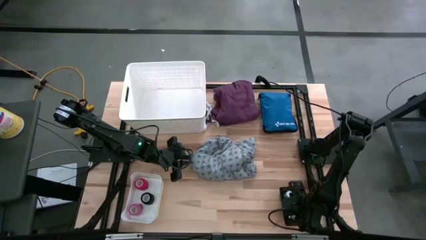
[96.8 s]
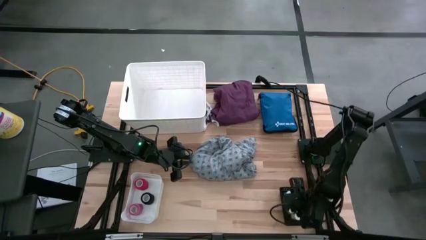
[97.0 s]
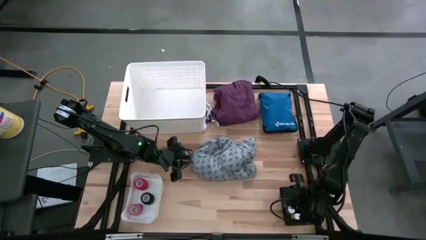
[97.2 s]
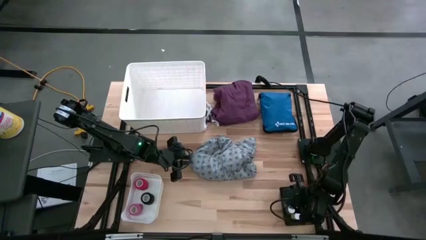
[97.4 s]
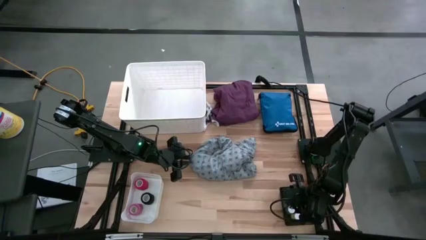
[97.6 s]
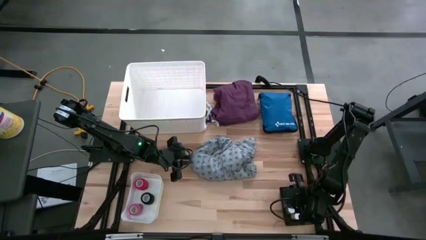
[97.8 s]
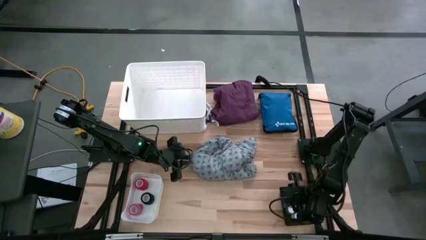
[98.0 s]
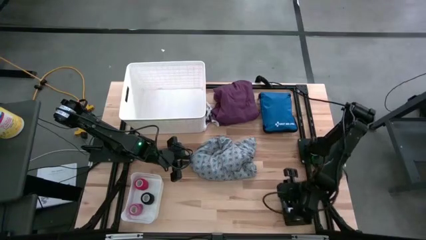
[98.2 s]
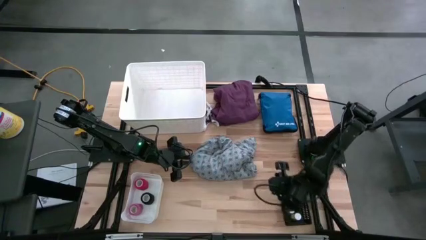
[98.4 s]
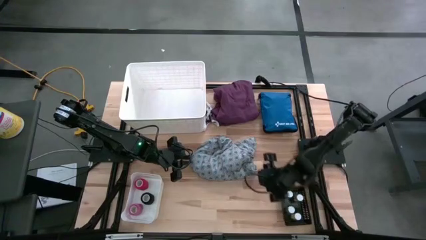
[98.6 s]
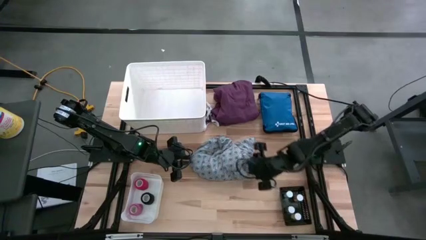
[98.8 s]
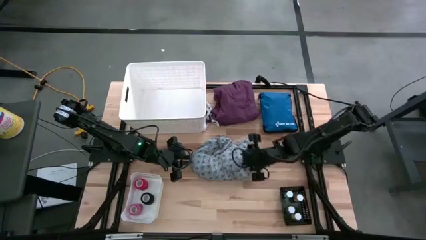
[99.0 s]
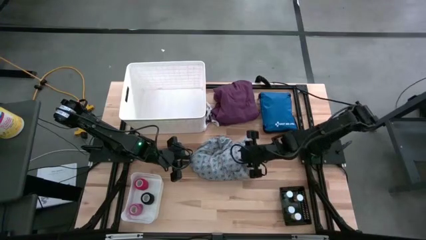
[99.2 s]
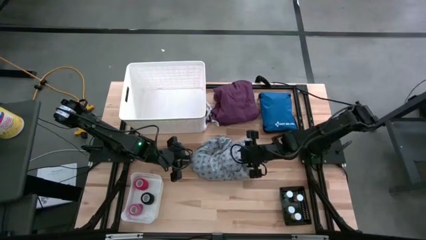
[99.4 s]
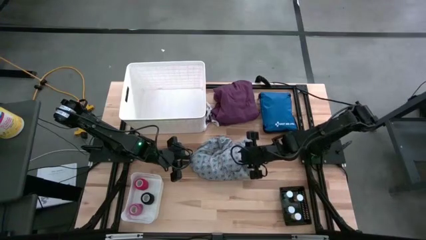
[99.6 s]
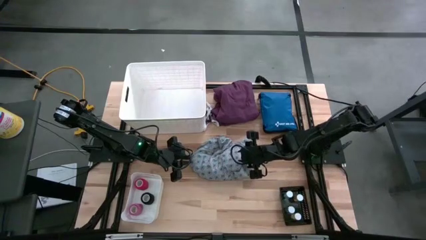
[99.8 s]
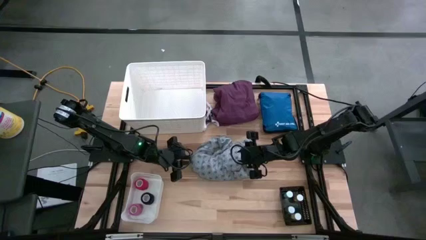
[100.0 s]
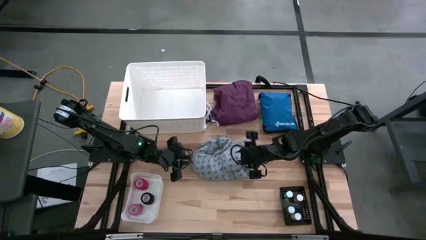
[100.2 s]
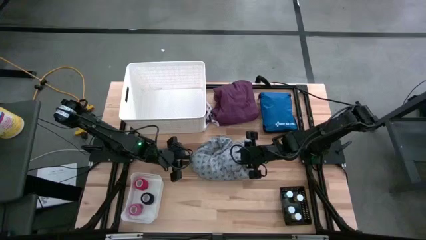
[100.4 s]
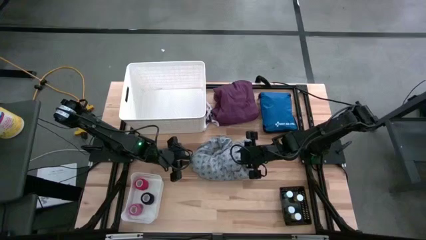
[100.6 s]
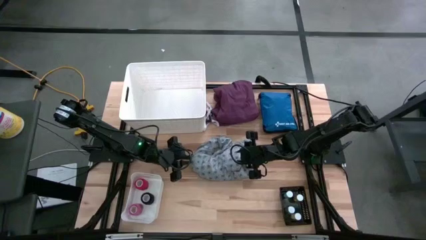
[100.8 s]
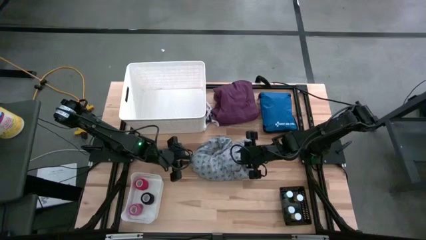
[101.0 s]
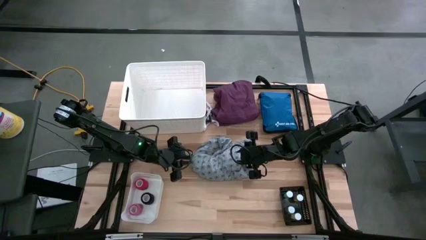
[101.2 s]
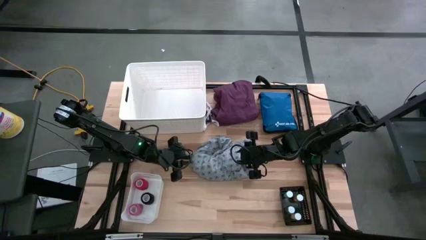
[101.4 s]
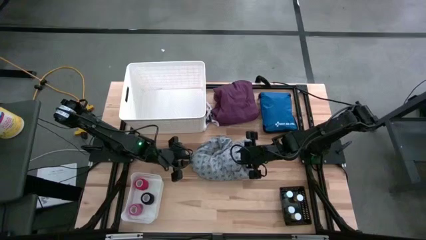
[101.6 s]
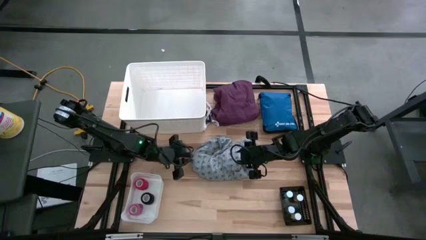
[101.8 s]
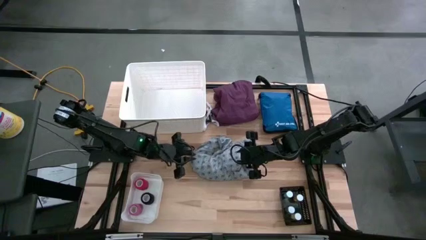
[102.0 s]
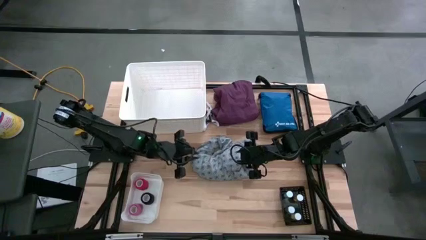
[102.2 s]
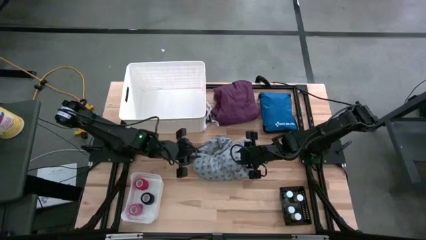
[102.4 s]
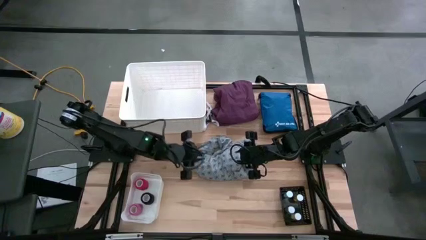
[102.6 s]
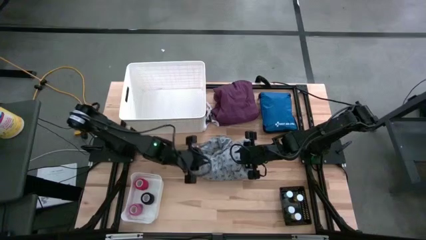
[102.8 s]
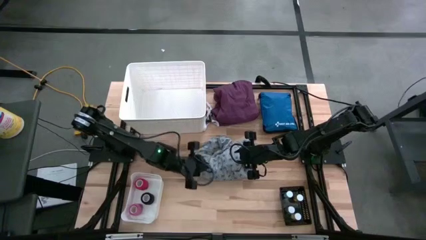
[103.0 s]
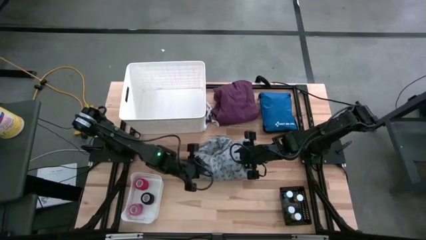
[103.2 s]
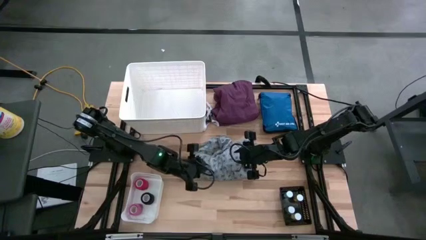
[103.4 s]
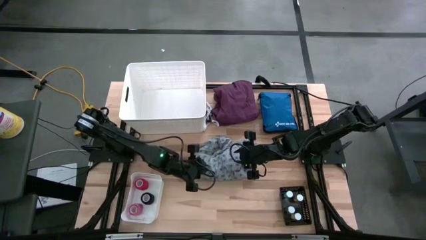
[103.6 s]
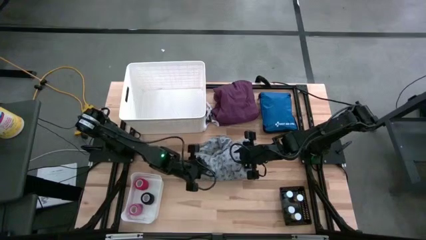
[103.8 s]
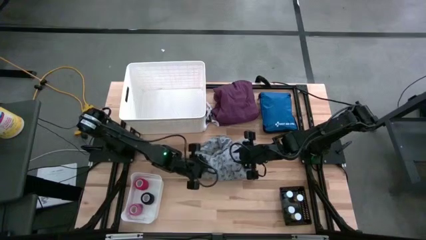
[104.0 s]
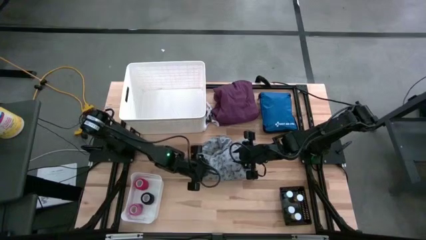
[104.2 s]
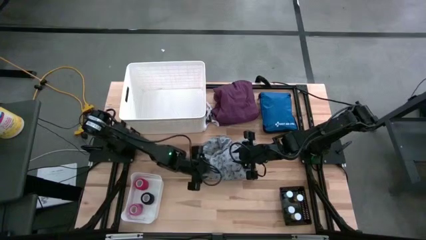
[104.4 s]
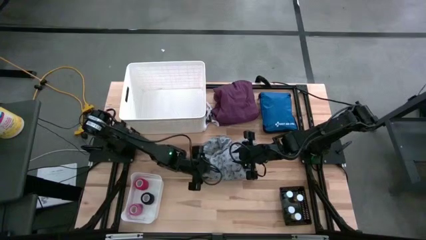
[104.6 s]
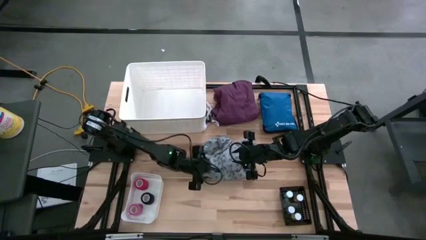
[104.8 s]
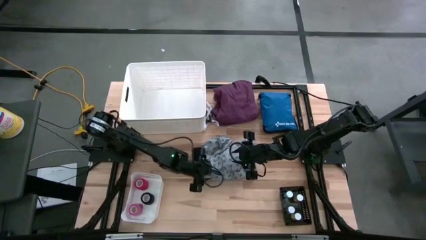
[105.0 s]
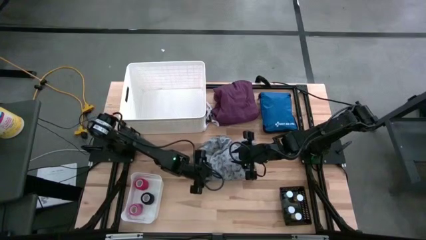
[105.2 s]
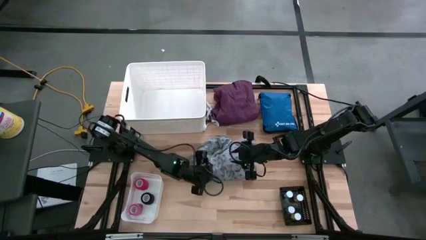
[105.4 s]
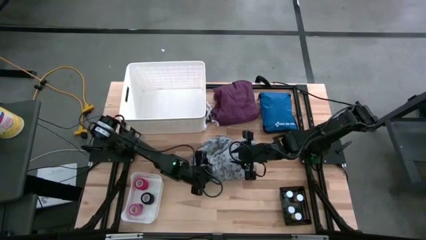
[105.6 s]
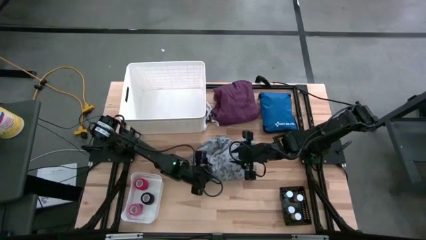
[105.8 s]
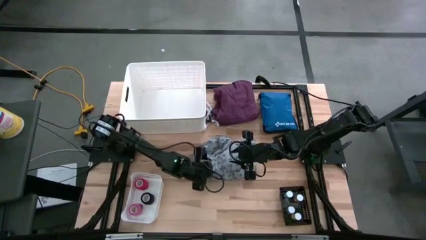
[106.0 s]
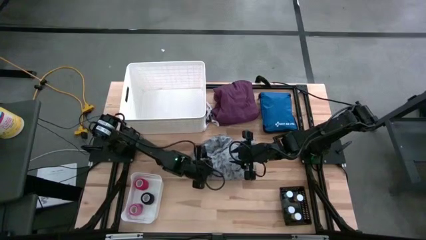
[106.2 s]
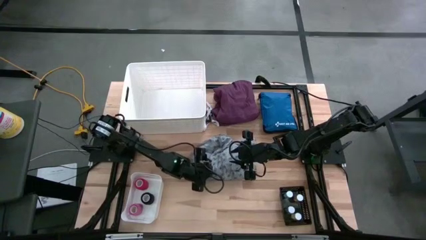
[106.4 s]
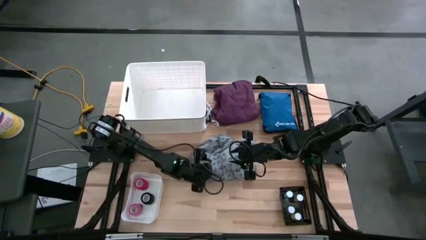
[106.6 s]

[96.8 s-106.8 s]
Task: Pick & place medical supplies in basket/bin
Put the gray patterned patient gown into the top white bin

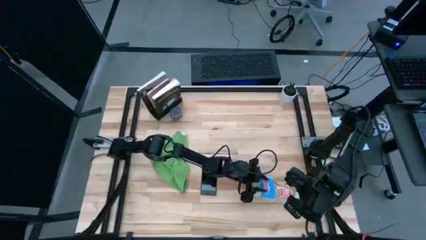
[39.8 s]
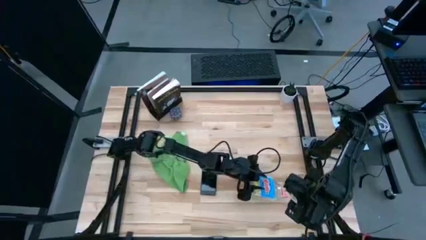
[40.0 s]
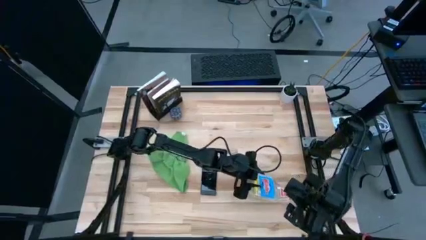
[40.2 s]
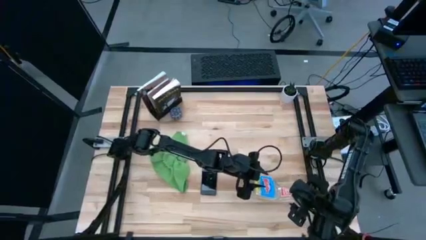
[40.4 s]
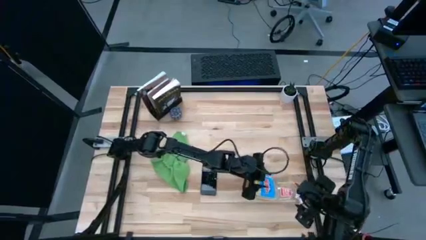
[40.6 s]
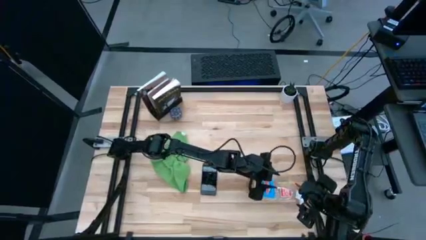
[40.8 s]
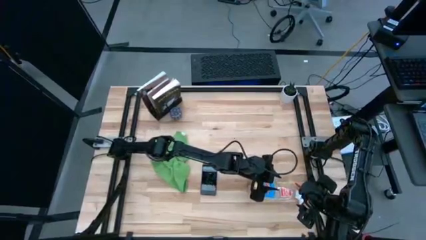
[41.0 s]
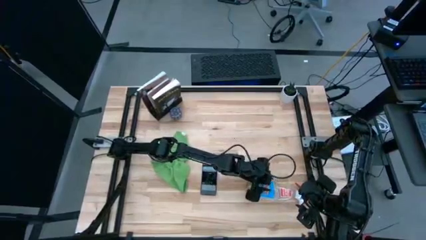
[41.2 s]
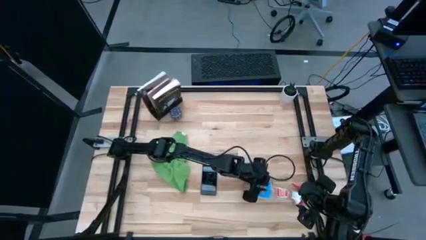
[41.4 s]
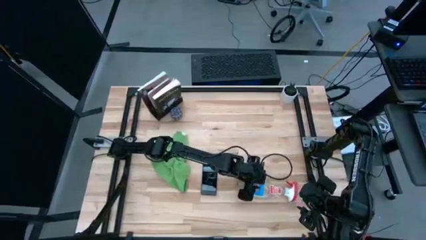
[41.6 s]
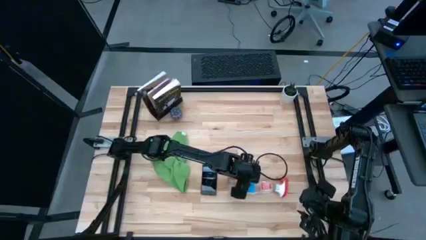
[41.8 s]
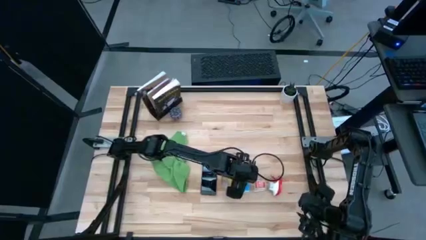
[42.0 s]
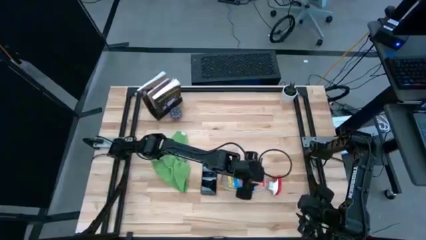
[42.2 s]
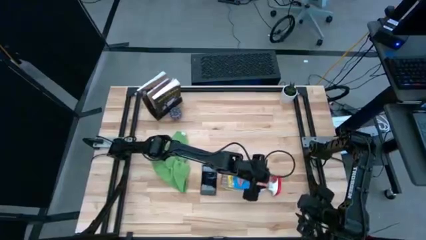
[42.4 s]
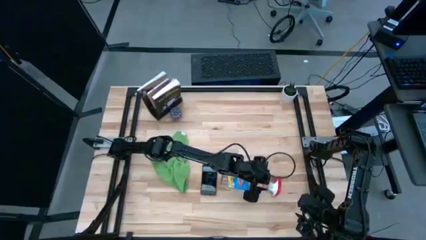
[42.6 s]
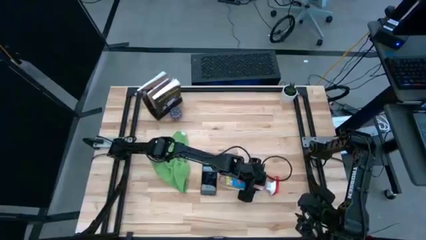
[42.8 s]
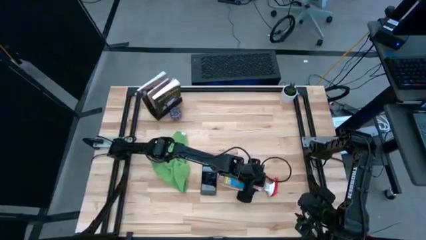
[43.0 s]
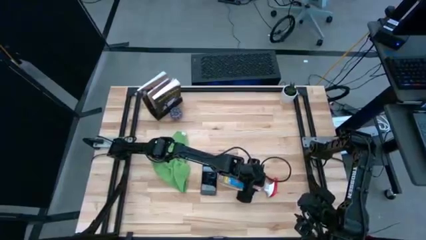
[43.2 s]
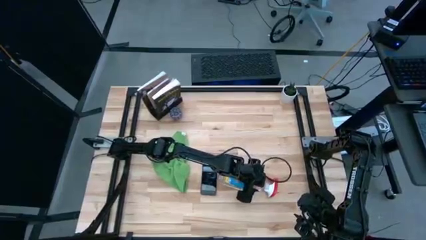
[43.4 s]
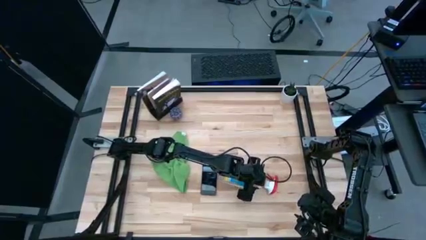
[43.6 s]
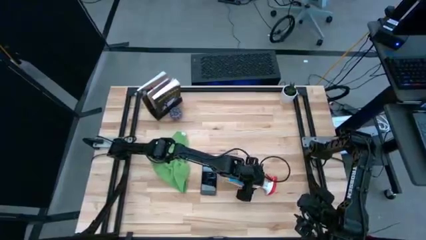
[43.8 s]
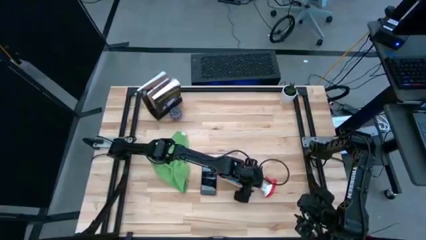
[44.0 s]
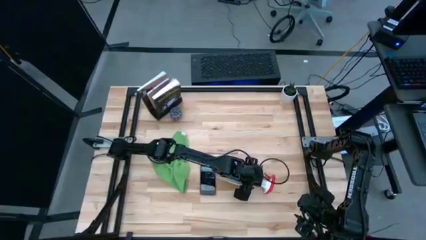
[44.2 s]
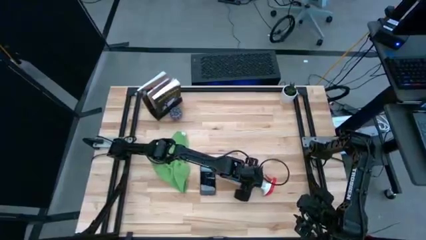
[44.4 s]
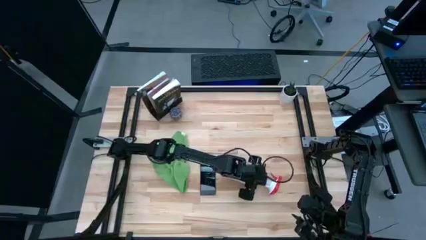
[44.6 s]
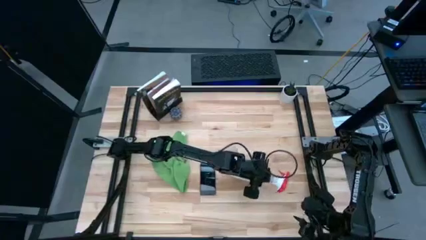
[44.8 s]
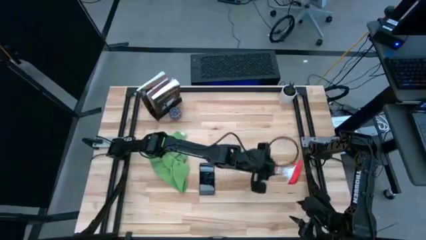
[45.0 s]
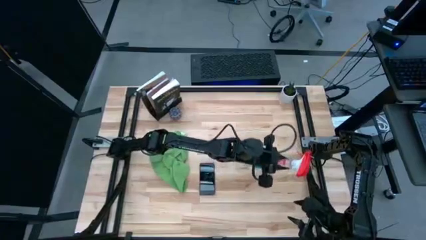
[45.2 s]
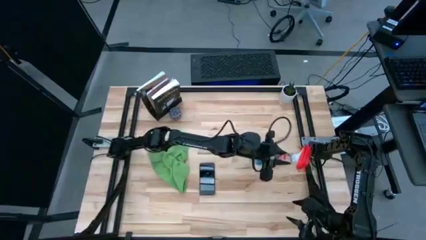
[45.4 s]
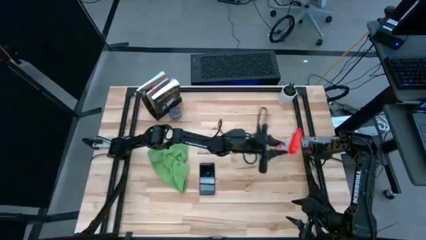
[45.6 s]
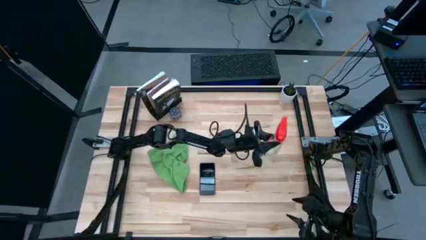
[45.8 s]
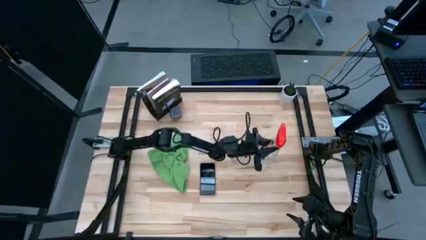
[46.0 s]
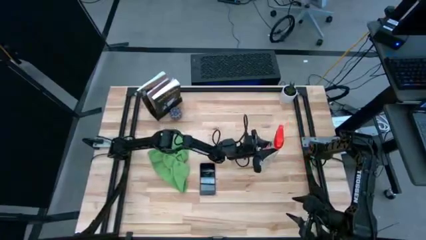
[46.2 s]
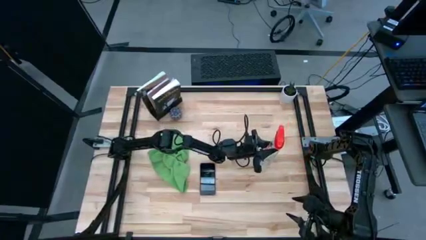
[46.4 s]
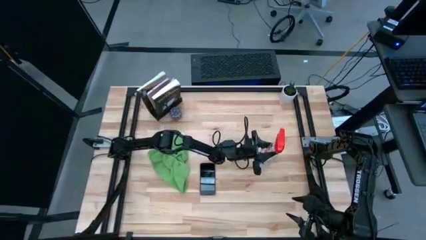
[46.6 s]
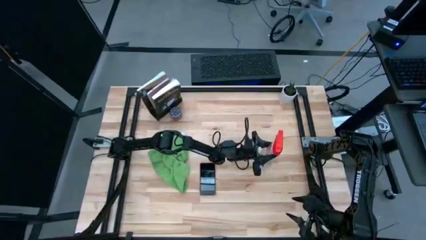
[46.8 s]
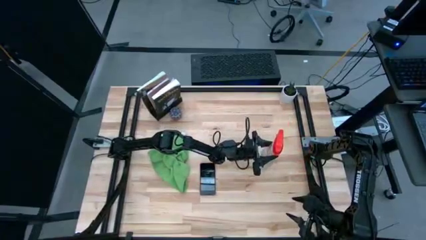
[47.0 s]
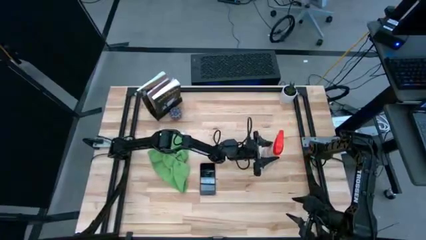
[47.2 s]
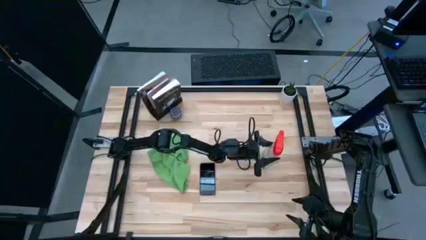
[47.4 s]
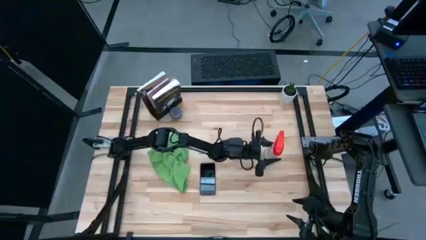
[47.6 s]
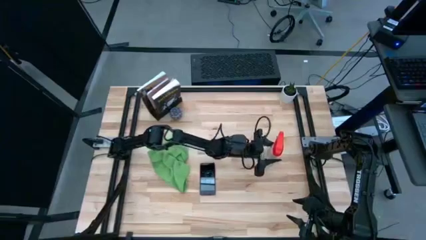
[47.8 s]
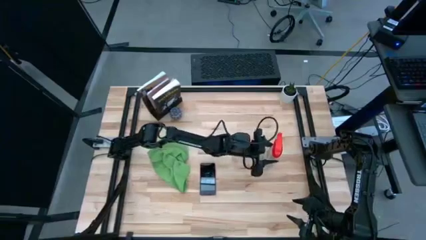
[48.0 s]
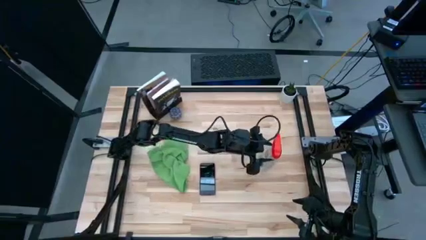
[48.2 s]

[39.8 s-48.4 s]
Task: Apply microfiber cloth
Adjust the red spray bottle
